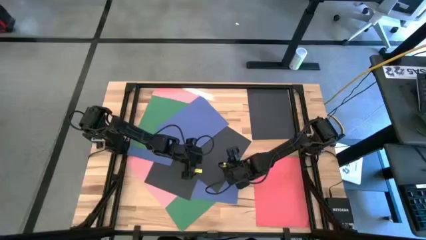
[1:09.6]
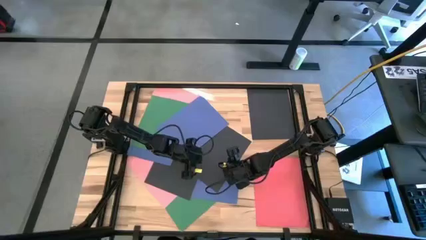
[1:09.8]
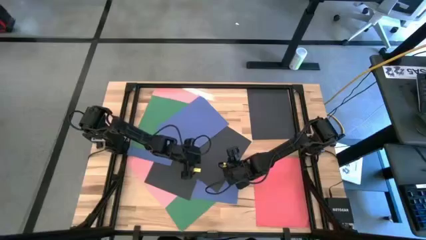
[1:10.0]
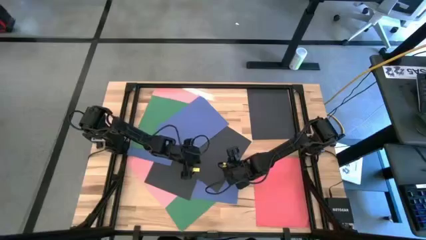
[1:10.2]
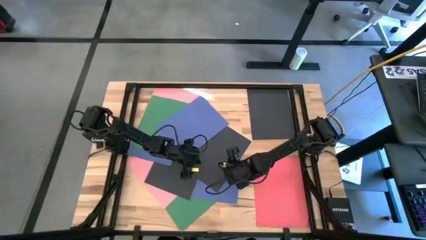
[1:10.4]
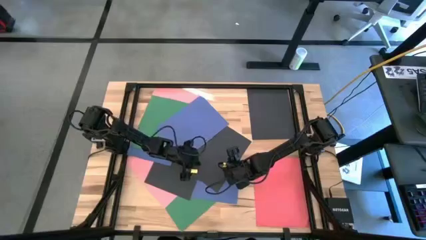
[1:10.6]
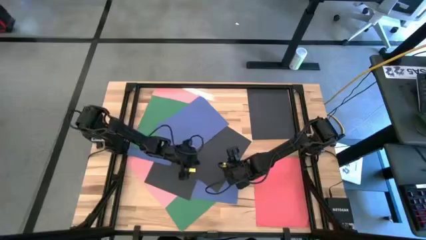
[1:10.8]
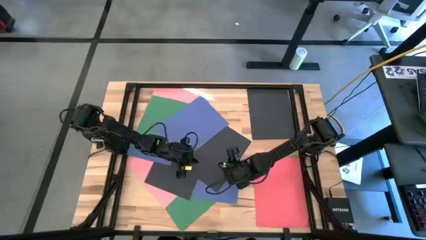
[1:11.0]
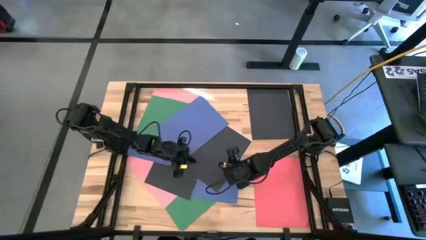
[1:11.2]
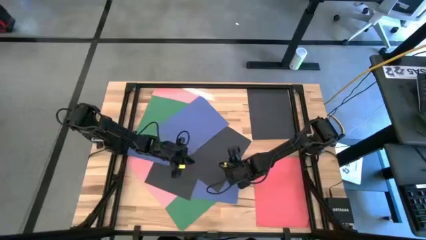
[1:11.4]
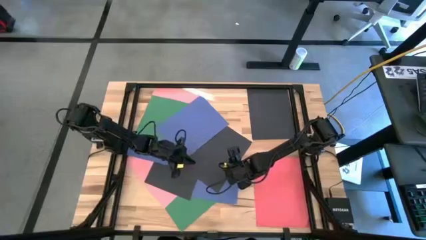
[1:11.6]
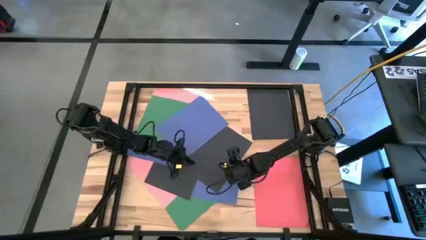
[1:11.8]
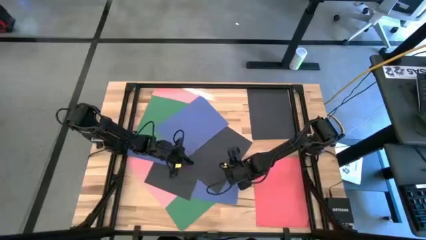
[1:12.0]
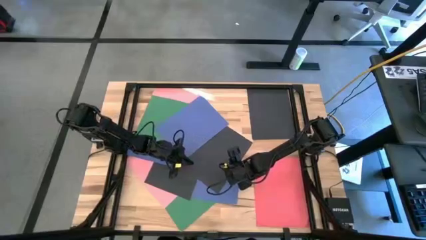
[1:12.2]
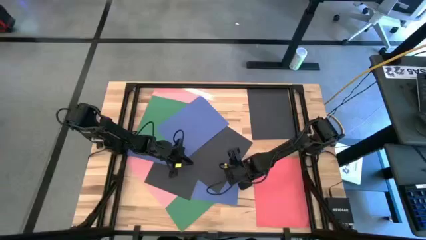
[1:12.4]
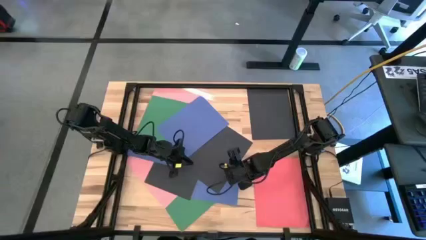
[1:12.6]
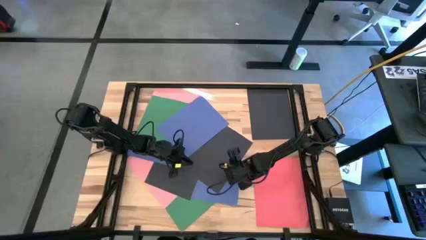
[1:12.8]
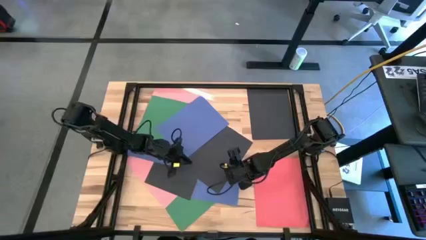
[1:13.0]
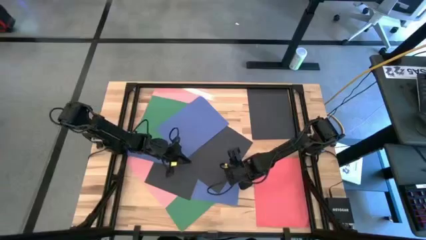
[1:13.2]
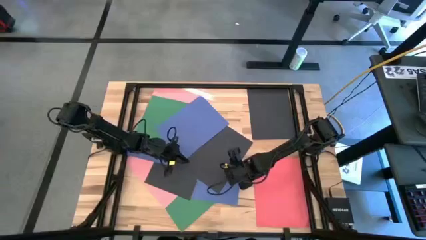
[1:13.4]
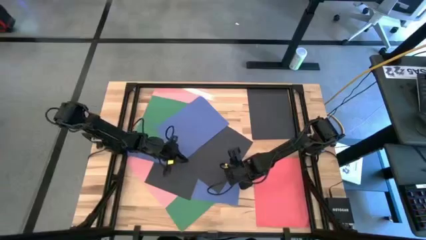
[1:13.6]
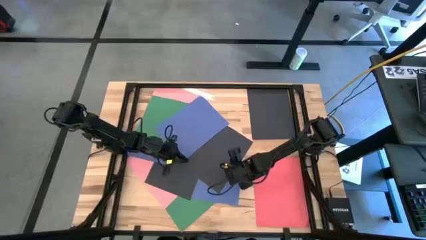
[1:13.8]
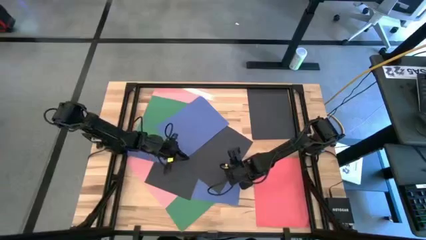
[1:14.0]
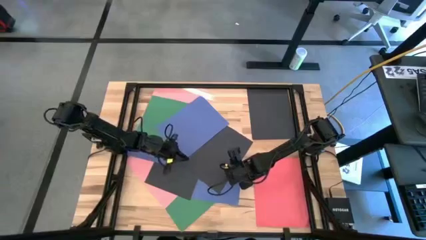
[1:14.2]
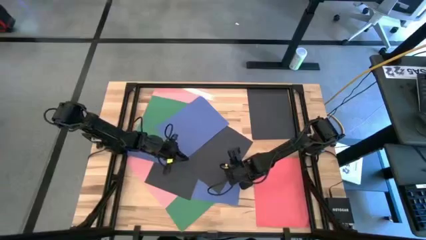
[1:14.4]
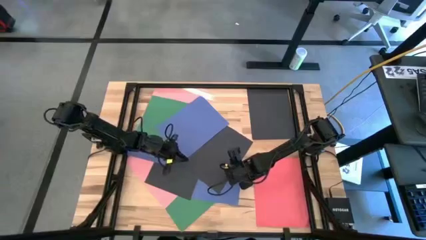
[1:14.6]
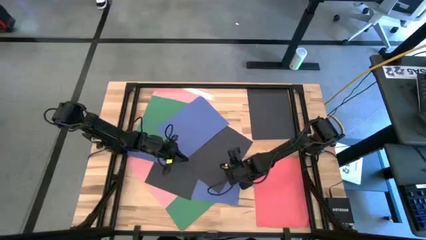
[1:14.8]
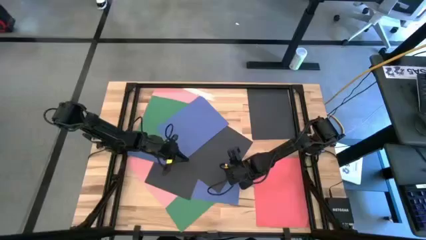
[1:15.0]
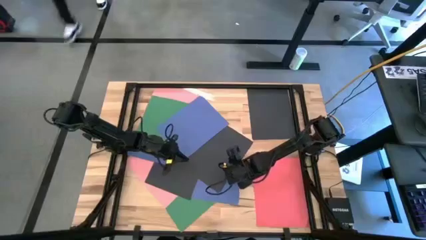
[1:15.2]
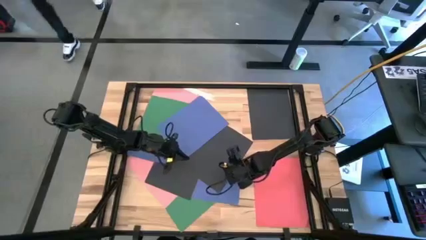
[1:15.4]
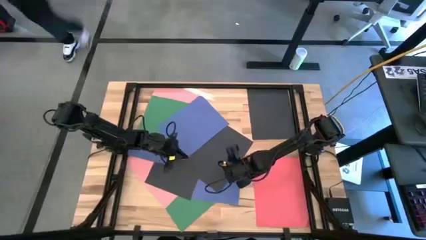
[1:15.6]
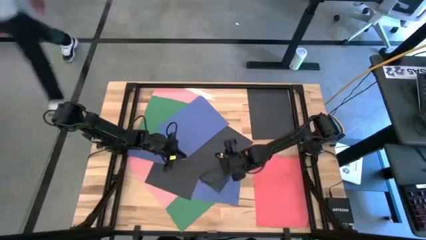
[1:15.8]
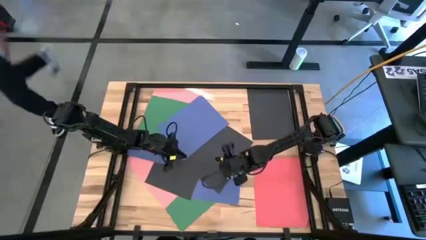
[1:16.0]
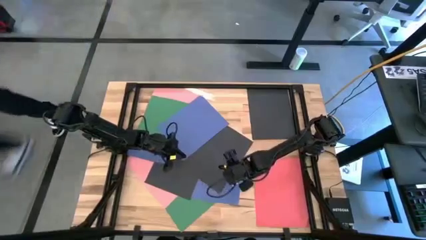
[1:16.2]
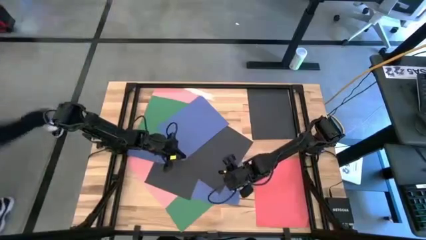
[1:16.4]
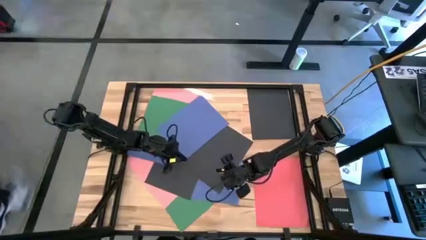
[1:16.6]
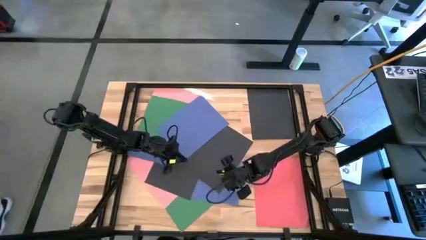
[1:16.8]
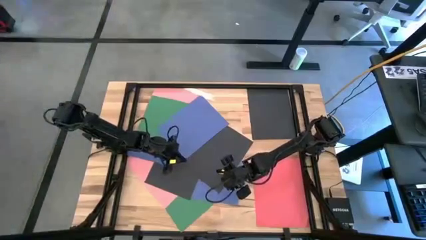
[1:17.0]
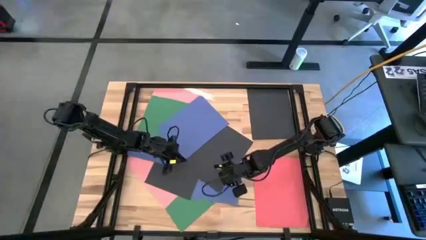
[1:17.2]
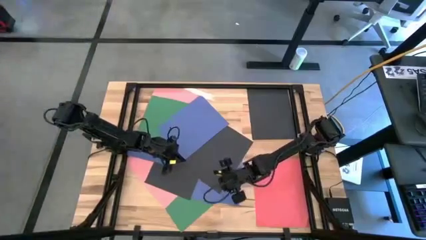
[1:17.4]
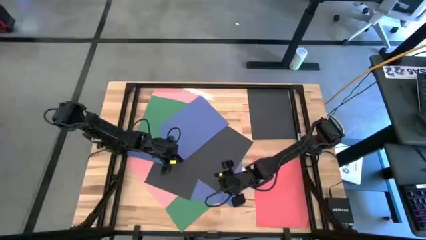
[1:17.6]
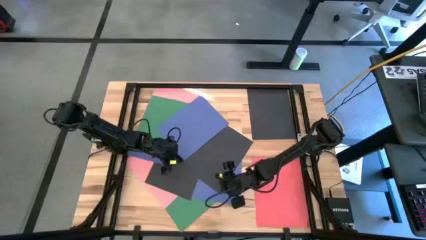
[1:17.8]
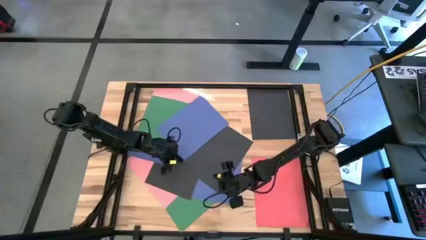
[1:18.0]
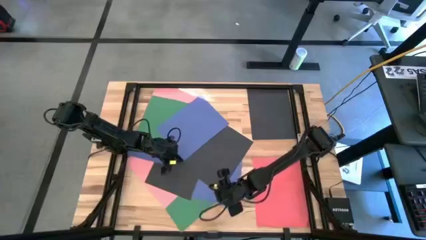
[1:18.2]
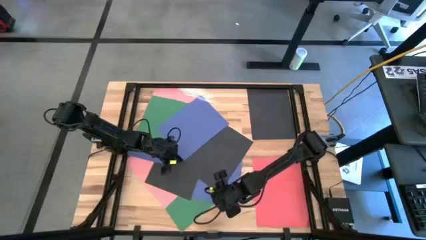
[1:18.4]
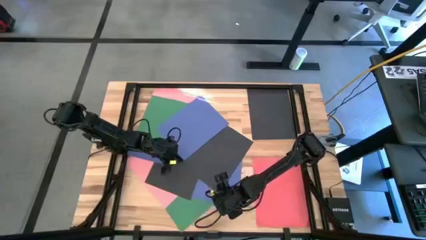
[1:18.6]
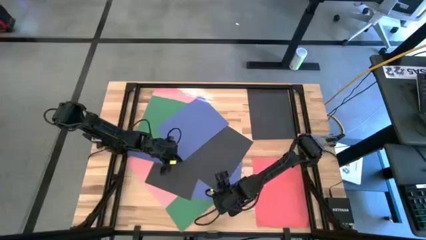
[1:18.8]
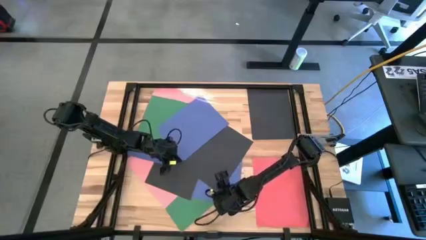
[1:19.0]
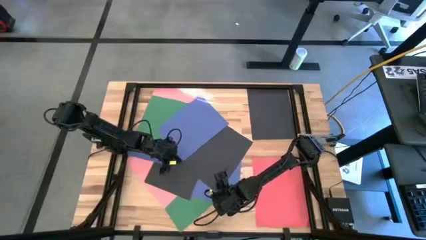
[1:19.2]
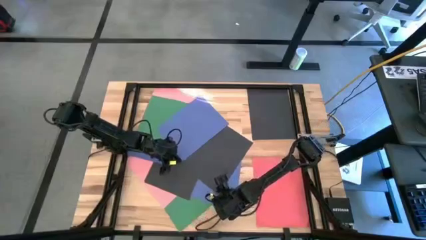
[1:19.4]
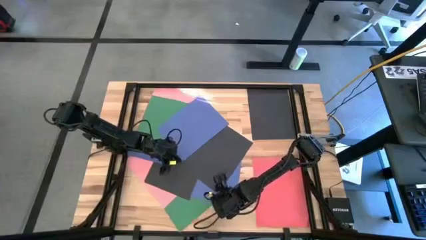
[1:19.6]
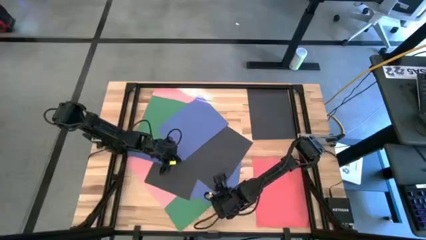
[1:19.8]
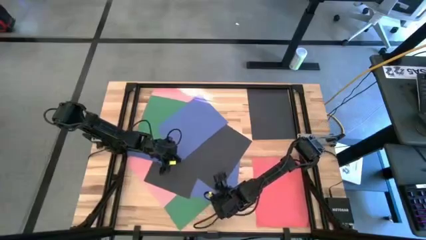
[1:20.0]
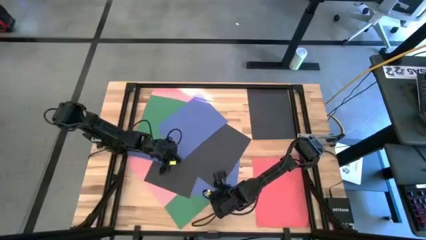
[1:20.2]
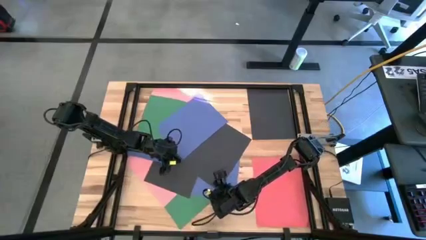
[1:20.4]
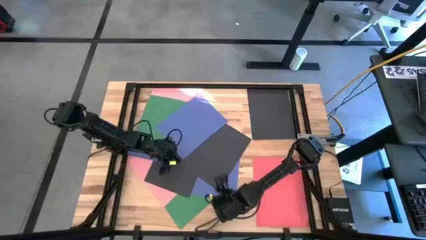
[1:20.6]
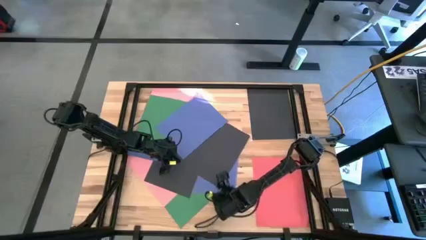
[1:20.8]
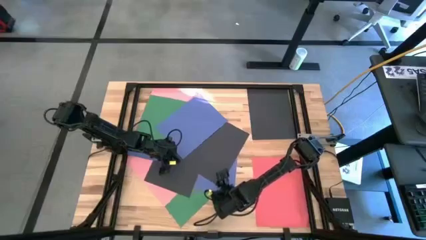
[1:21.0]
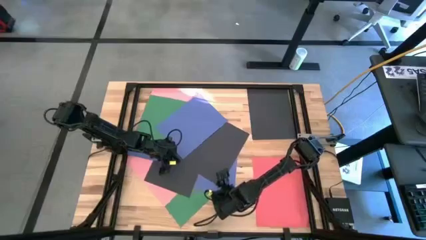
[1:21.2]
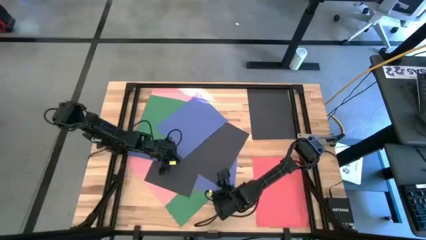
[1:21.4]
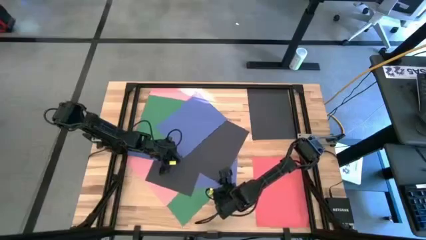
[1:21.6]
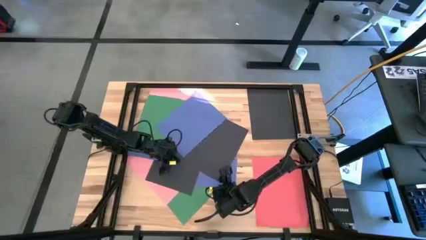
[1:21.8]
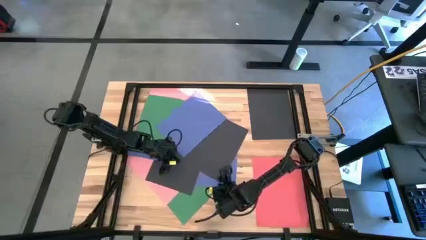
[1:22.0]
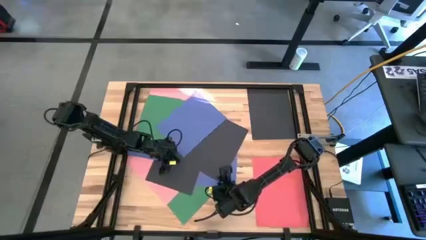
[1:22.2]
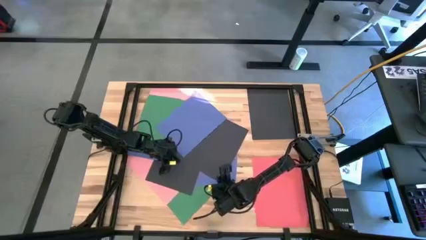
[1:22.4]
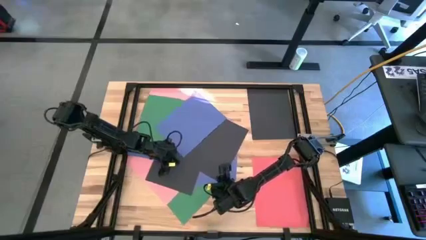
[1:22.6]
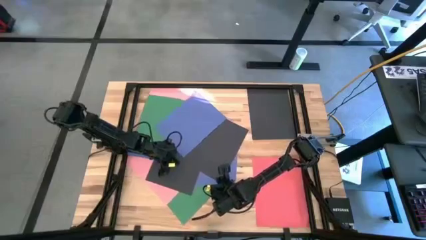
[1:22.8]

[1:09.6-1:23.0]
Task: Organize paper
Stack the black paper on top of the other black paper on the table

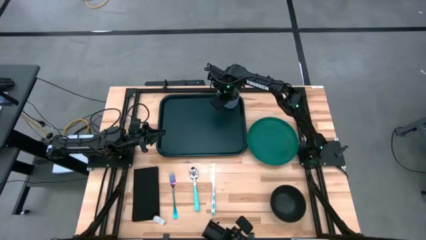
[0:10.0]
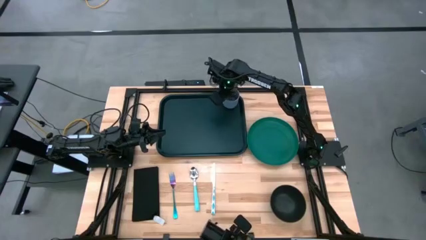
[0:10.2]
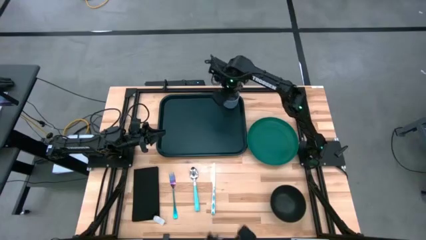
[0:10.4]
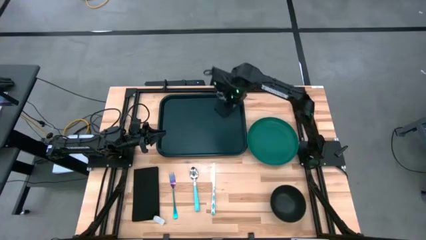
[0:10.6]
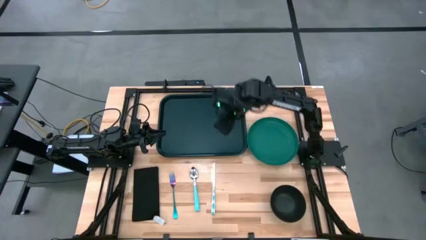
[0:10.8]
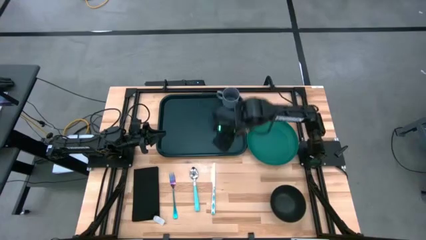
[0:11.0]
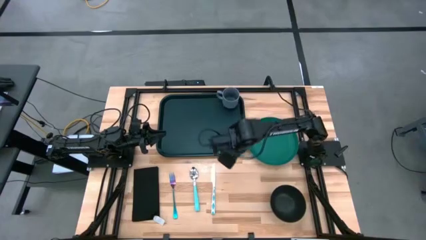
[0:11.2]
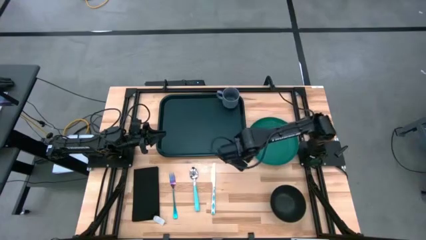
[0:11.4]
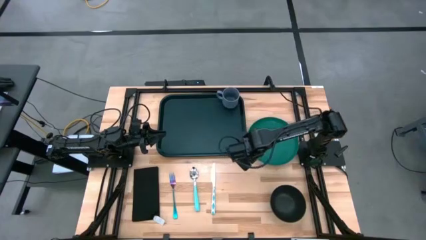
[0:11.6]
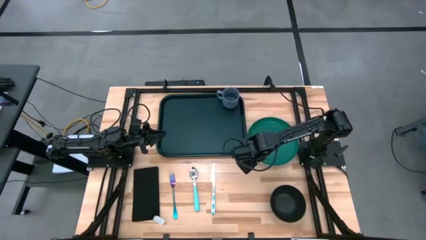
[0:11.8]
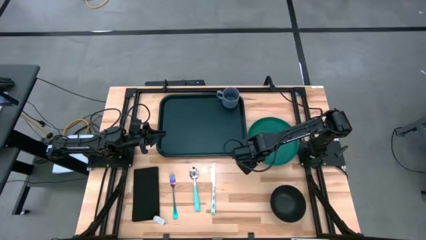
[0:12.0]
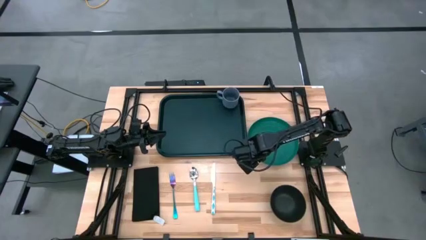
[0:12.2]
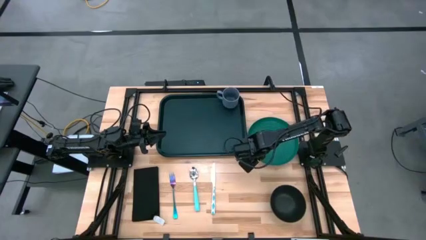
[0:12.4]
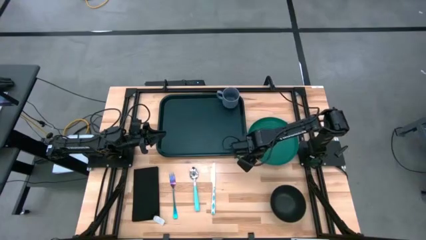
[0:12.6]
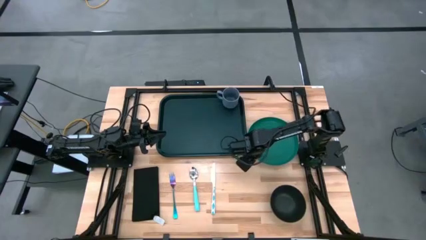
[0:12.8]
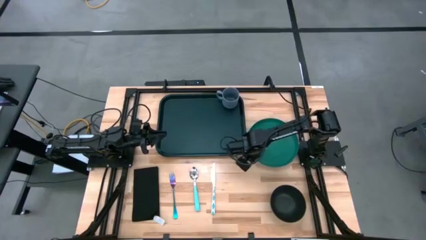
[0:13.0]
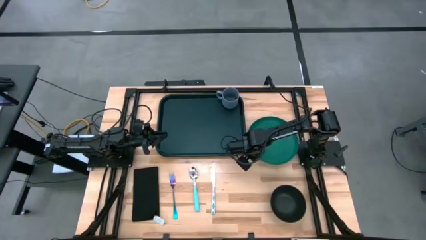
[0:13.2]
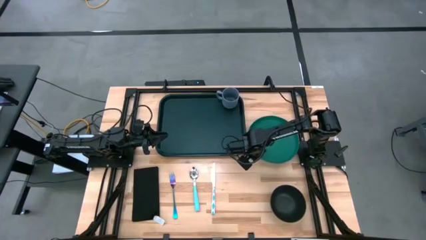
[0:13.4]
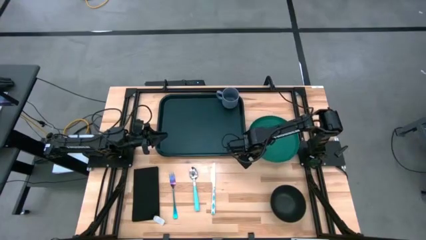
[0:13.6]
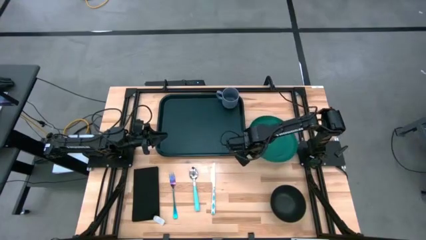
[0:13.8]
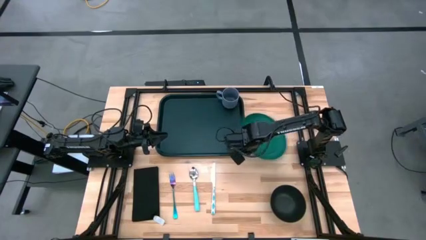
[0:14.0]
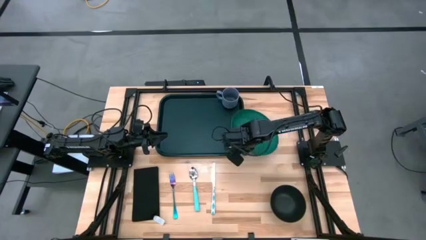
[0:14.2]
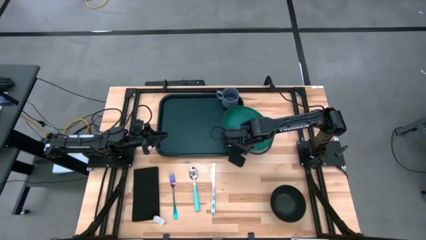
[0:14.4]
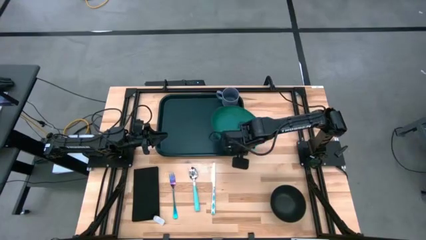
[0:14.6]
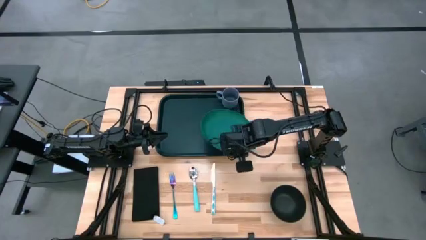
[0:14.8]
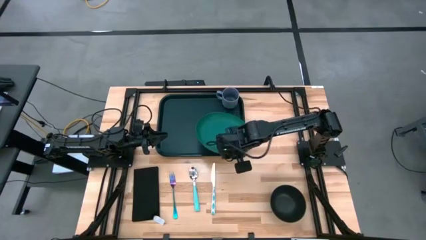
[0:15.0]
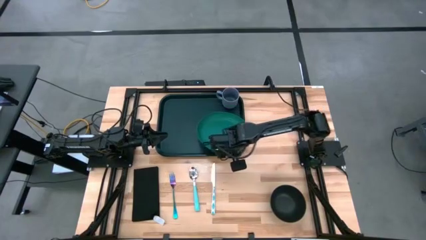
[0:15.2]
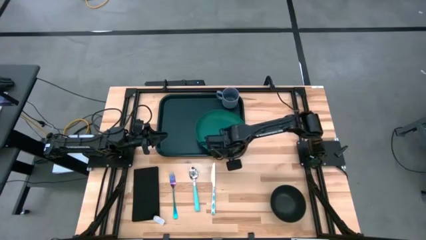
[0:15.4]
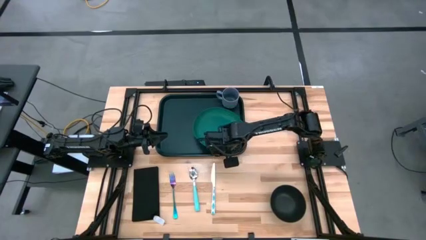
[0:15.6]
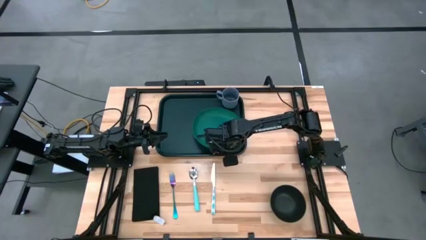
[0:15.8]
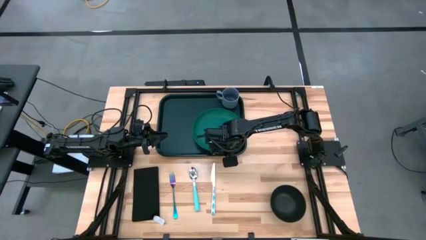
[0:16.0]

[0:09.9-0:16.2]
Task: Set up tray
Put the green plate to the bottom of the blue mug on the dark green serving tray
